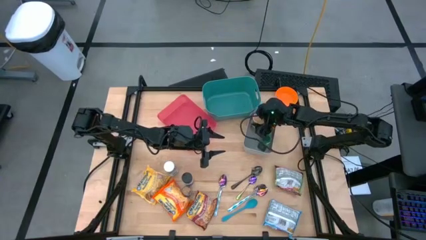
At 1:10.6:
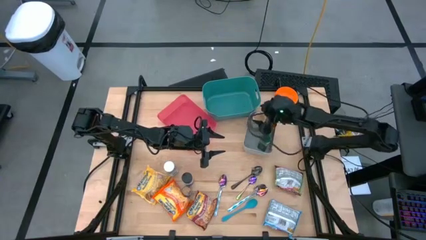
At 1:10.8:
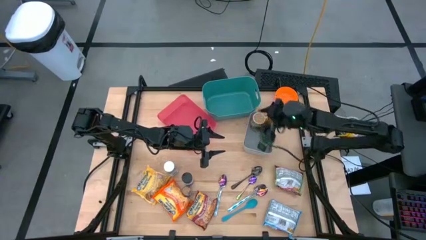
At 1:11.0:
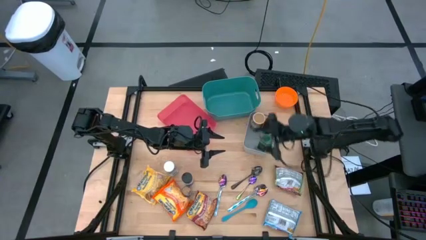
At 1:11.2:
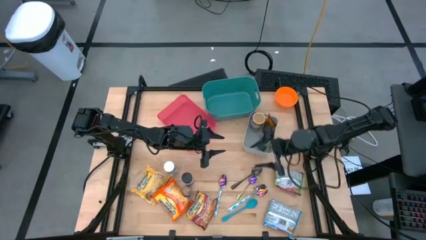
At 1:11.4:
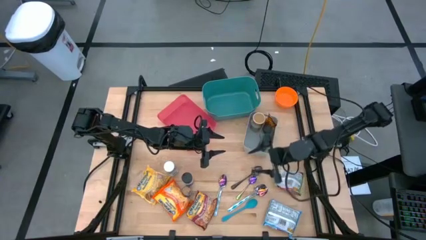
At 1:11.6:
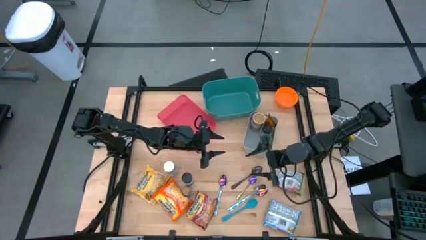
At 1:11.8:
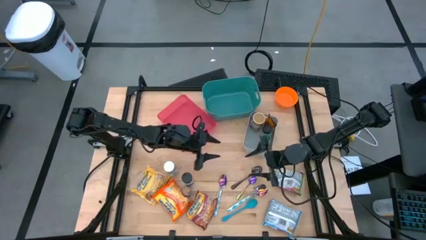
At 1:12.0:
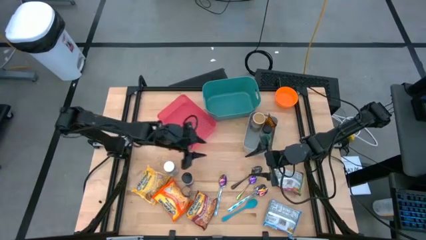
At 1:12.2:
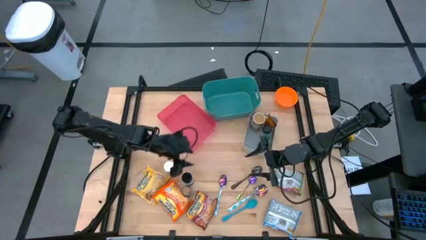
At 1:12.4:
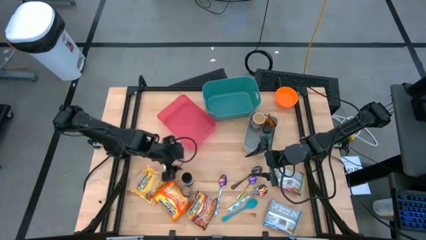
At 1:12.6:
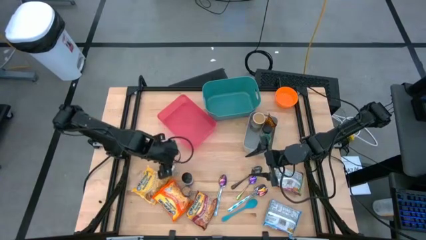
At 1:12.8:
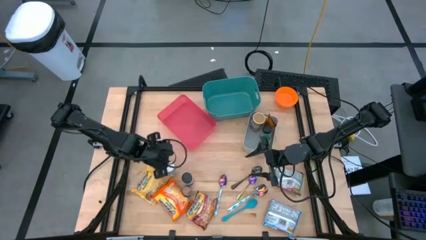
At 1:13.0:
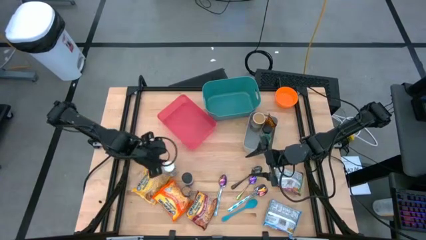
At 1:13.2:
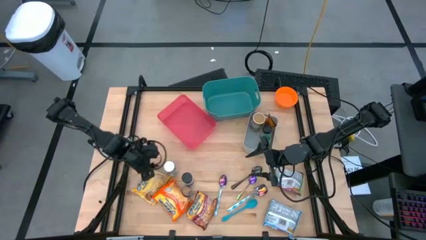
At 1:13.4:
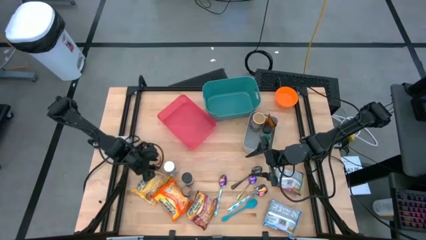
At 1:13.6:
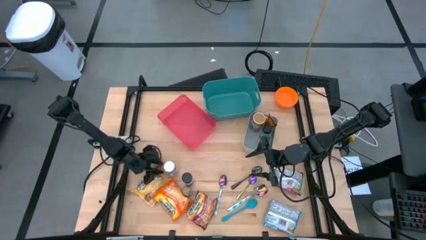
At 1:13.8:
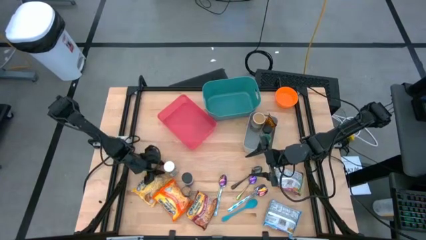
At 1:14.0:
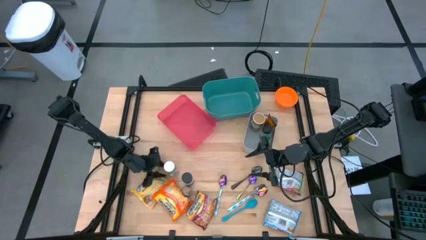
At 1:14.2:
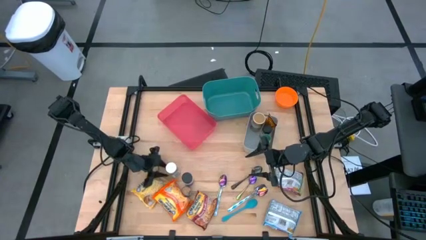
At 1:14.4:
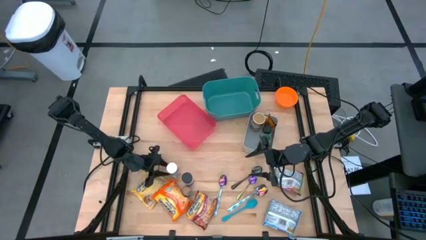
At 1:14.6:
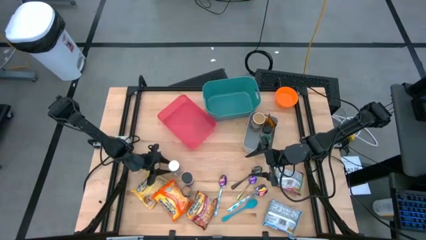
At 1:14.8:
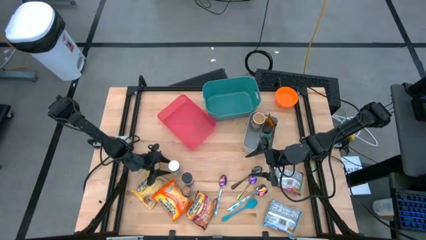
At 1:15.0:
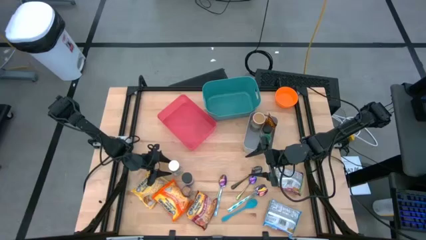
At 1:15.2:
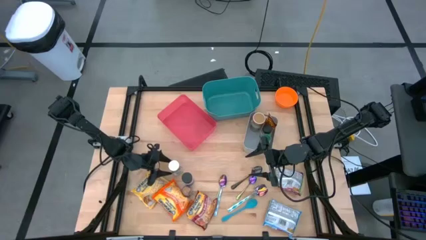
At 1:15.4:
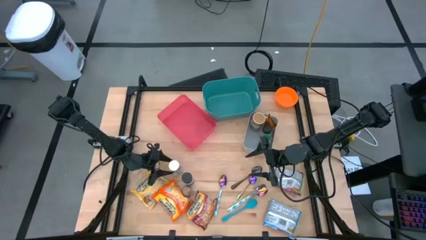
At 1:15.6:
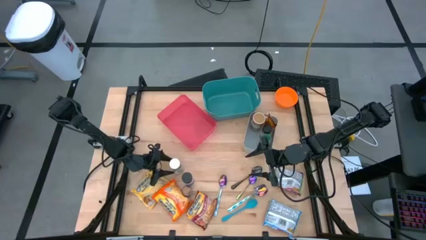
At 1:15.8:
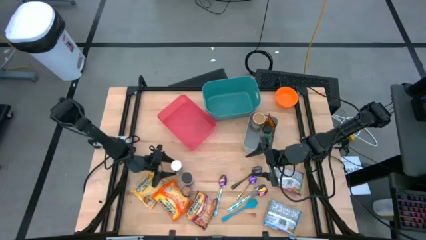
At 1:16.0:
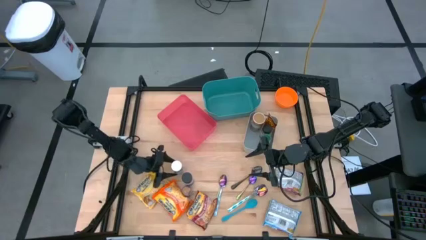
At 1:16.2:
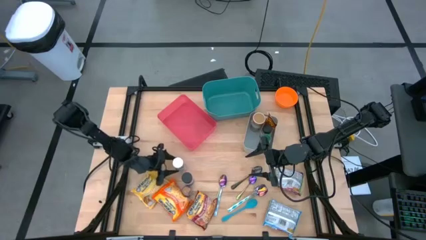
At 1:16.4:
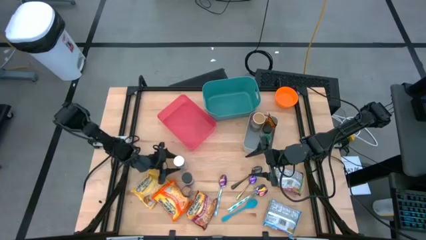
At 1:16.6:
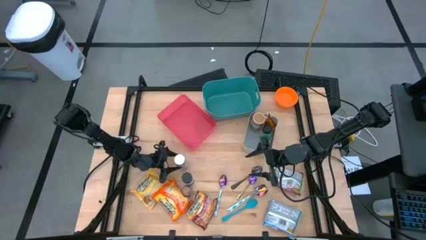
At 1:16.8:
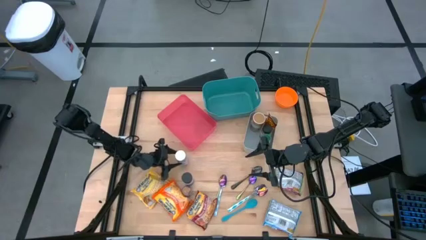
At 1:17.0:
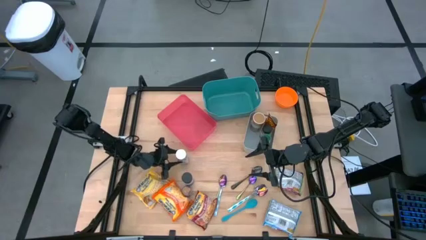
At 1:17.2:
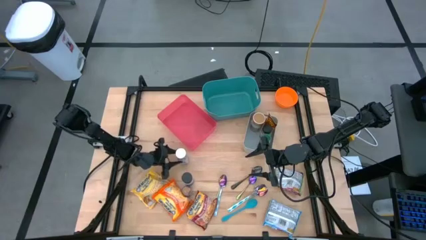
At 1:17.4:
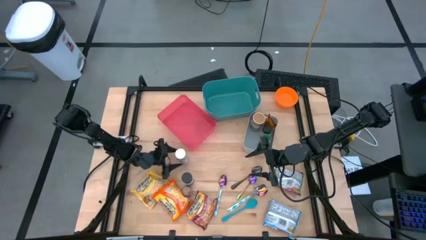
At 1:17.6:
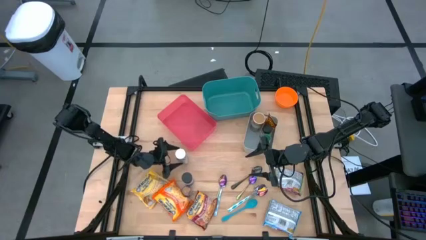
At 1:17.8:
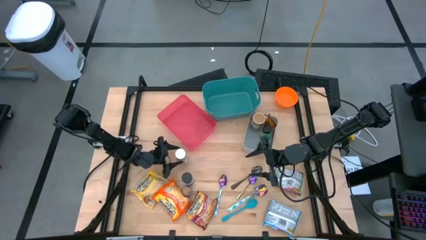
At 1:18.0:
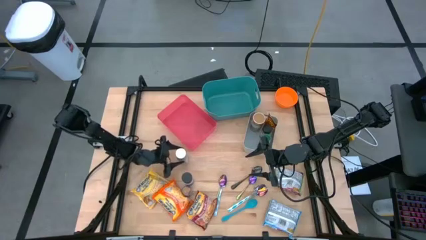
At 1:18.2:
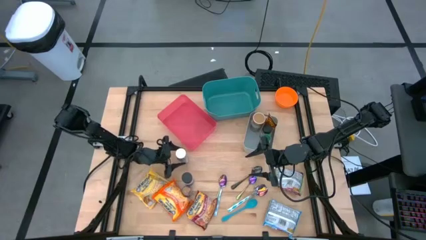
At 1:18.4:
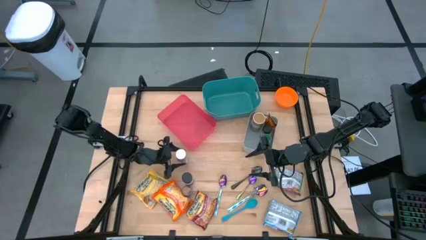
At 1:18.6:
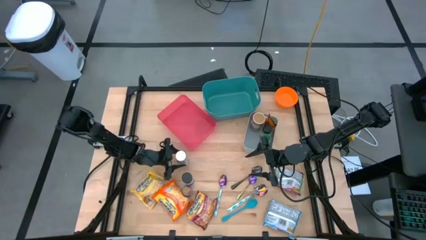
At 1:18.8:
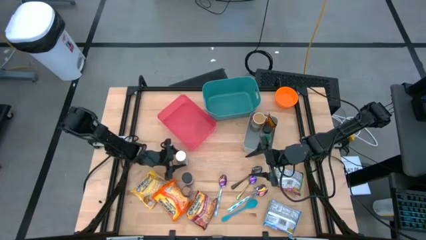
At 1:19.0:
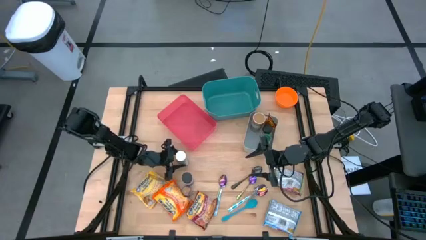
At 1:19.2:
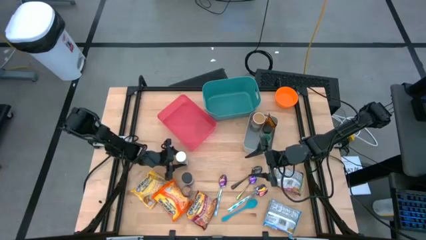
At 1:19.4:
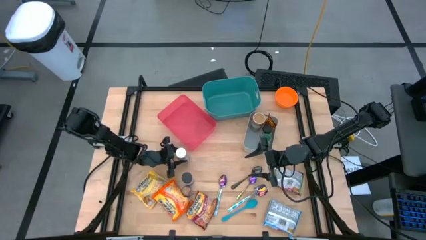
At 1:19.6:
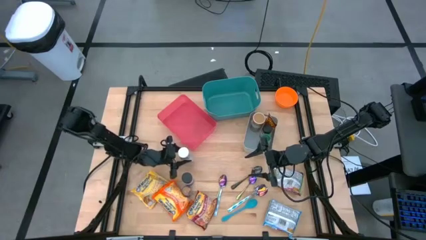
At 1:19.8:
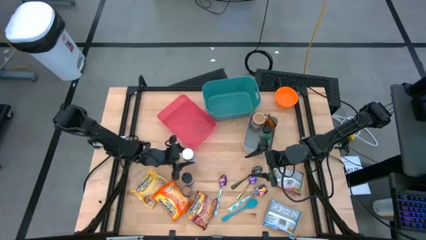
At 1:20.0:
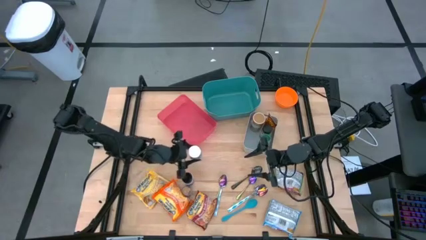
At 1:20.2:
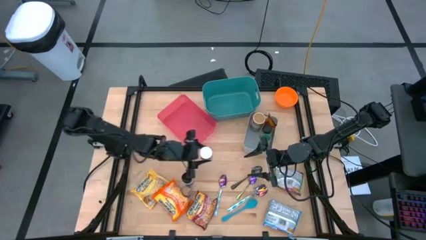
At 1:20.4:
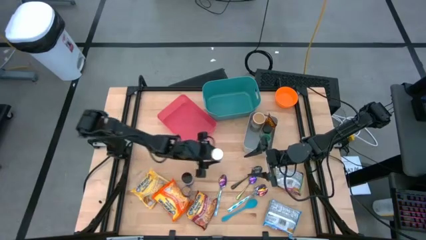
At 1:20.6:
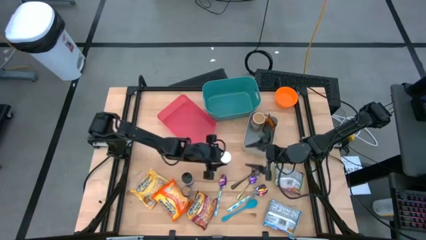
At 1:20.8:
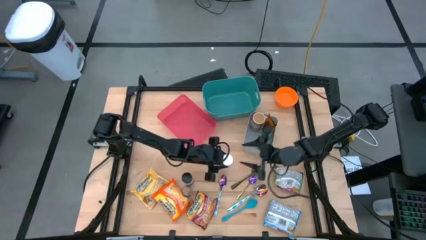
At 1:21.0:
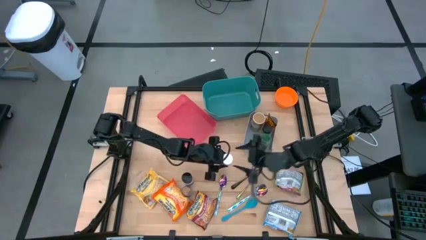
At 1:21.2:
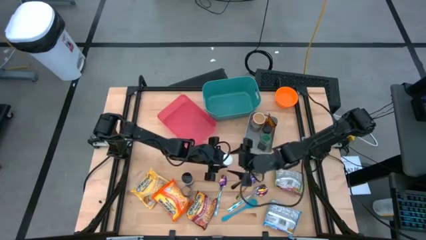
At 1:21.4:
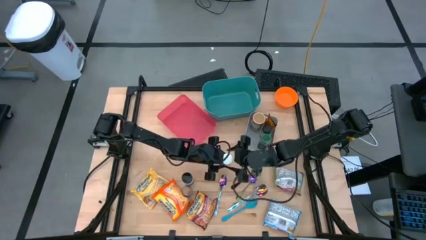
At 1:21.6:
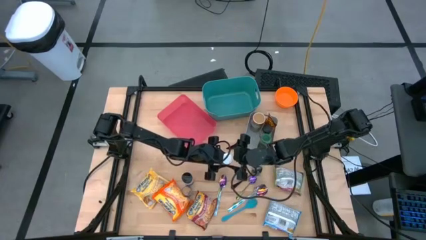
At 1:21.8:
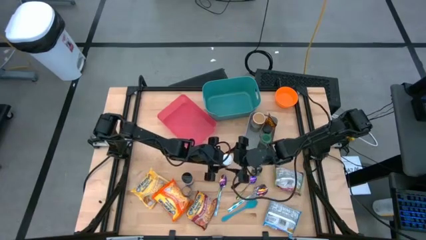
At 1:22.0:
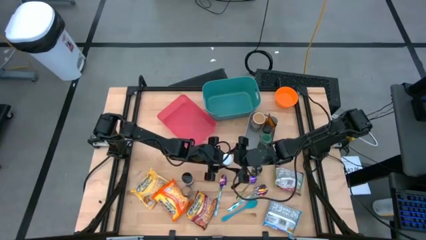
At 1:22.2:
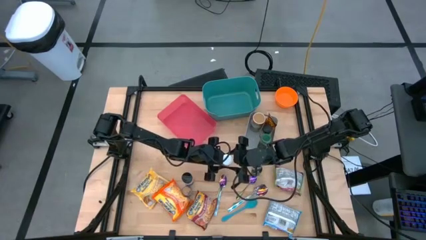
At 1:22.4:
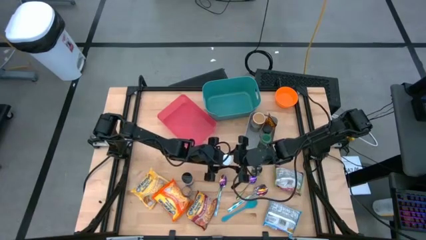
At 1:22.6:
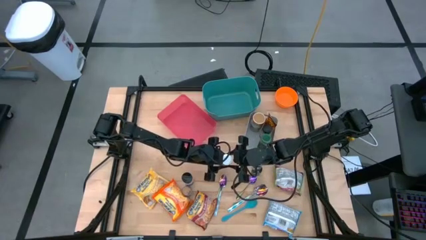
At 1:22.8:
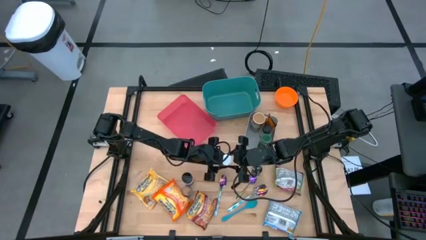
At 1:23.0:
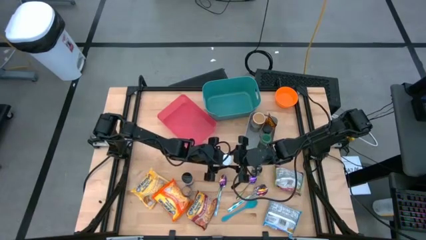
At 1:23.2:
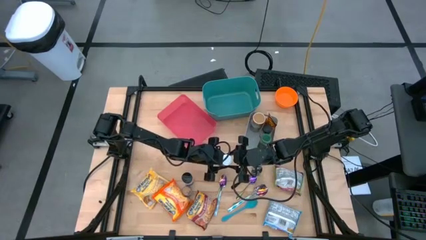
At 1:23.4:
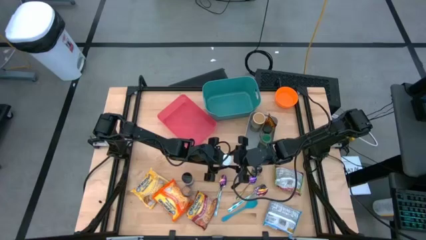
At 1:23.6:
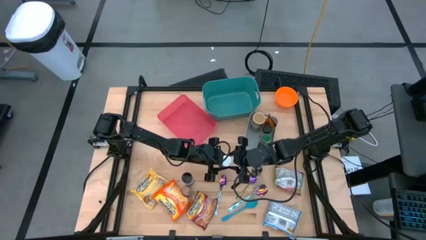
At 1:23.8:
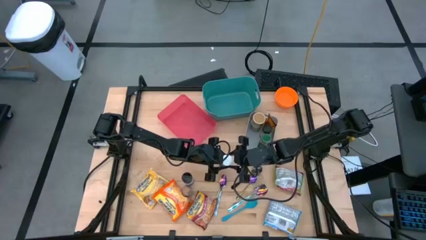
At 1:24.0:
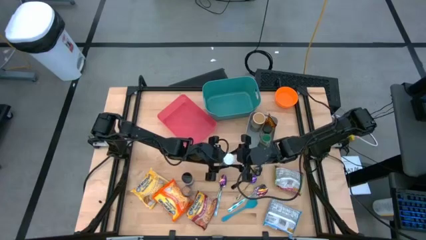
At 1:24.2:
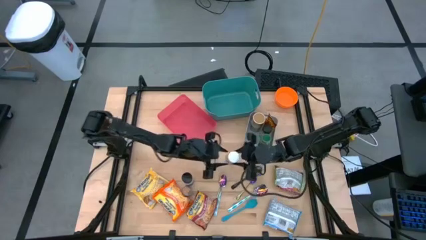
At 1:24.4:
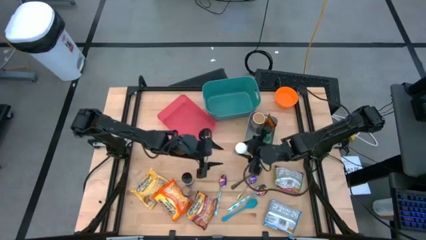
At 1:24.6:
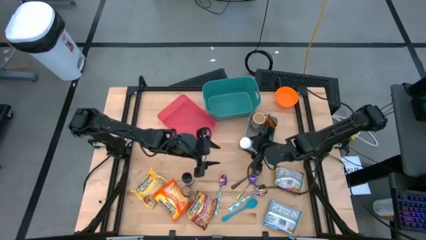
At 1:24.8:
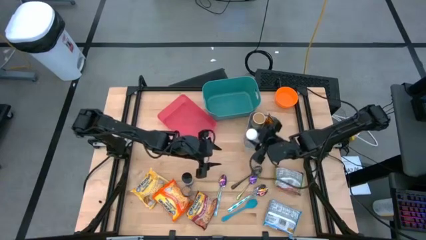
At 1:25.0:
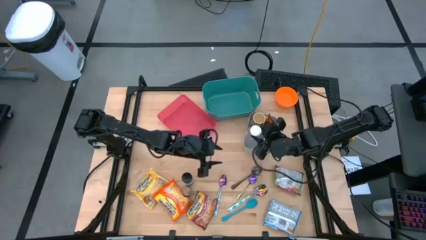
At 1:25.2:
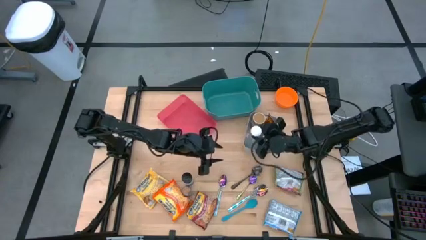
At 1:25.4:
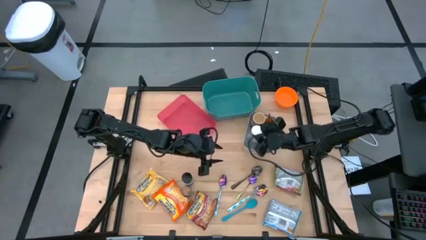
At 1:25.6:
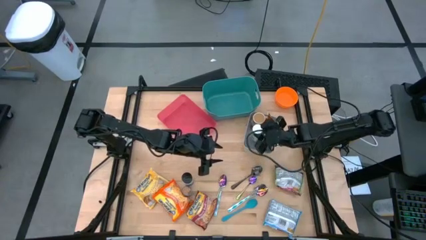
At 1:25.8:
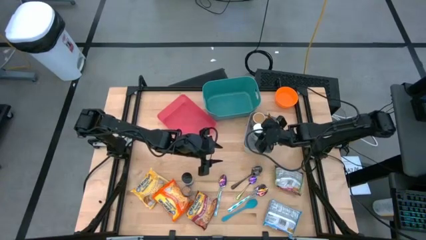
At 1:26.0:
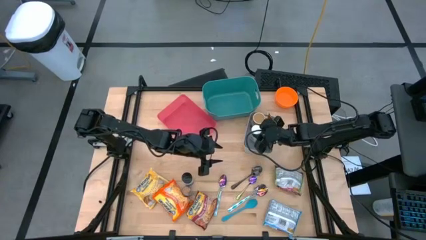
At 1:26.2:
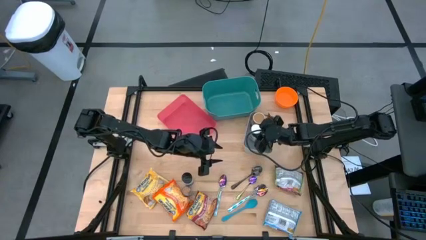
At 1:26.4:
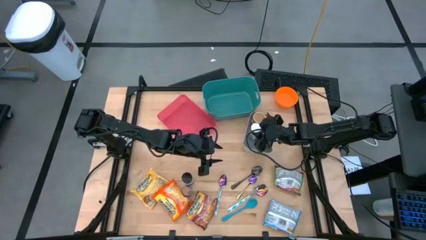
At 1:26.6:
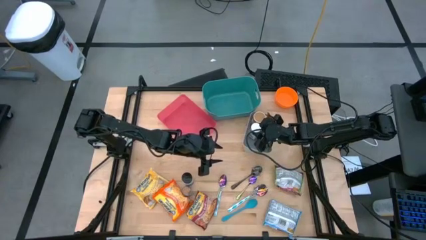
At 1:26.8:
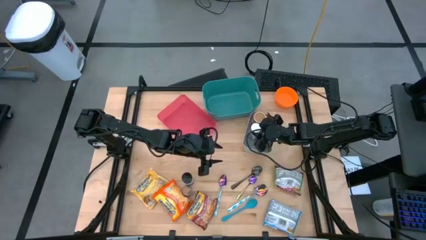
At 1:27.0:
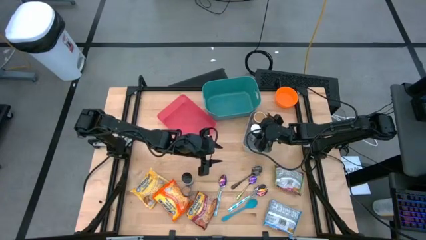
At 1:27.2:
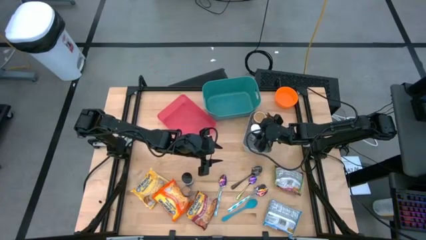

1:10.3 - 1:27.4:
Task: Pick & Place Food Item
Put the white spice bottle into the gray bin

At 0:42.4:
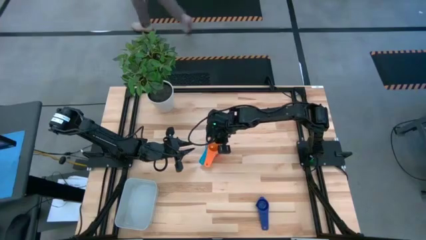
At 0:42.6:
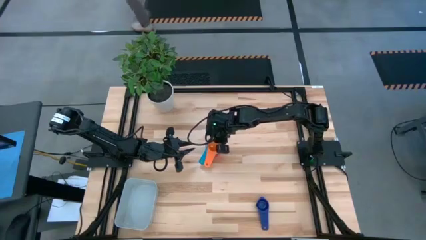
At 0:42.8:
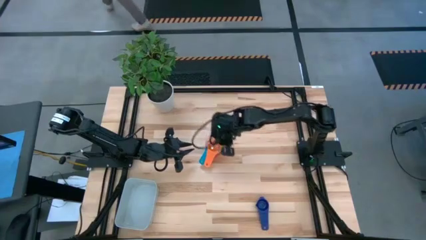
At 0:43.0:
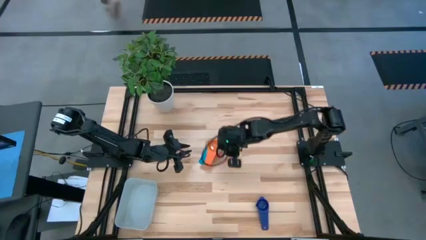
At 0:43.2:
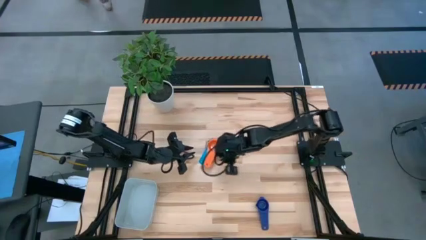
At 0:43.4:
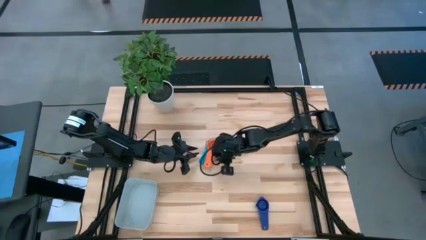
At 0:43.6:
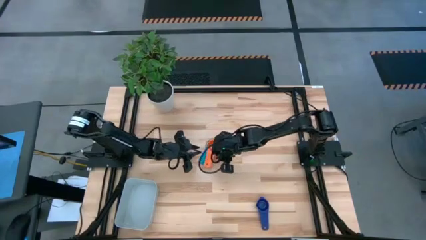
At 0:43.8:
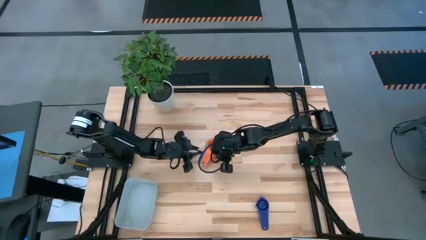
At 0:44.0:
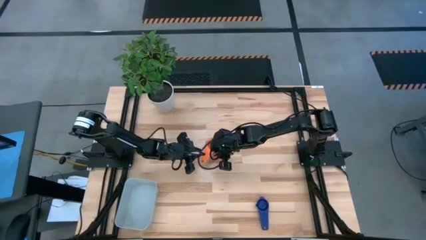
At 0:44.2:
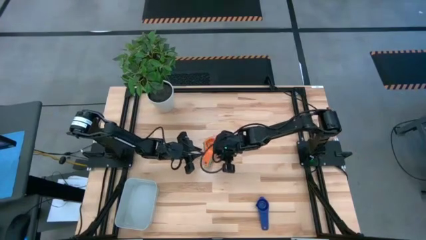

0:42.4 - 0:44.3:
Task: Nest measuring cups in basket
Adjust the stacked measuring cups
